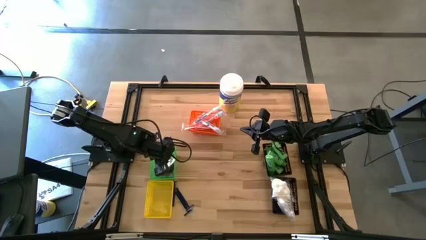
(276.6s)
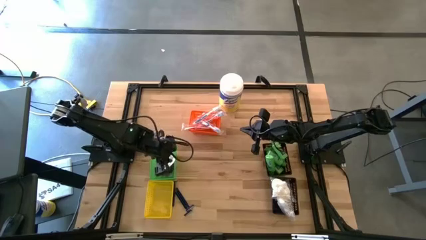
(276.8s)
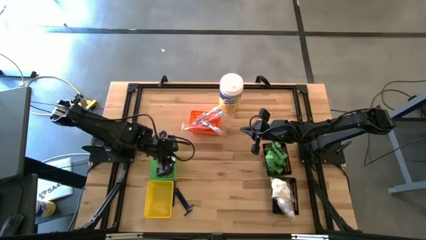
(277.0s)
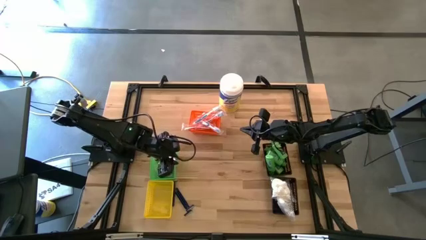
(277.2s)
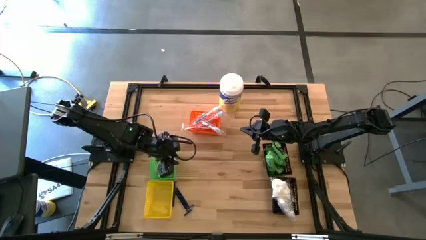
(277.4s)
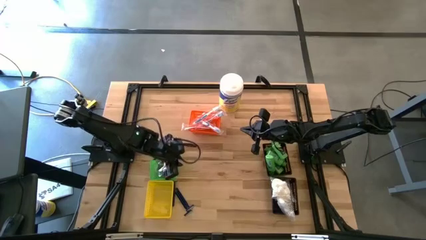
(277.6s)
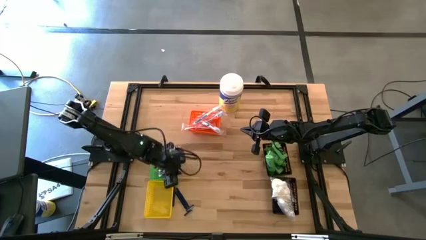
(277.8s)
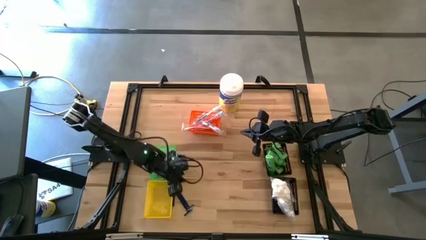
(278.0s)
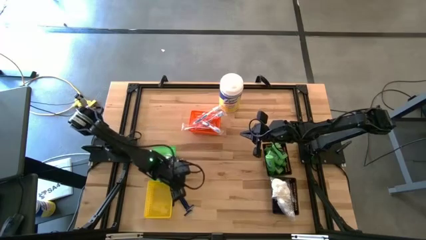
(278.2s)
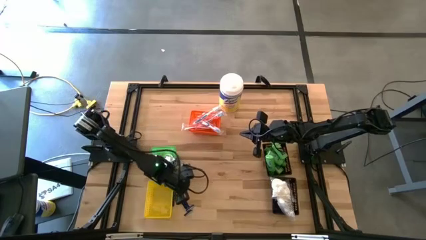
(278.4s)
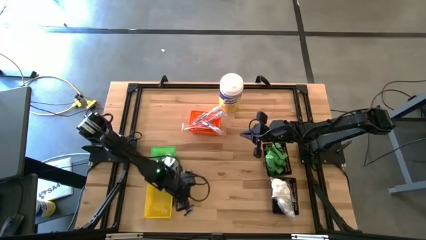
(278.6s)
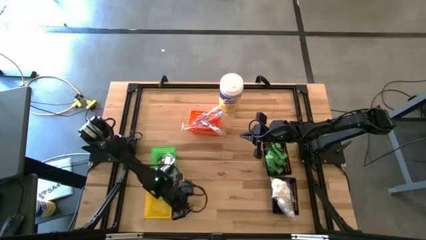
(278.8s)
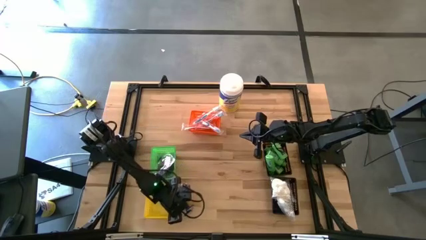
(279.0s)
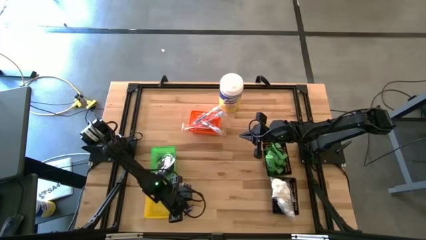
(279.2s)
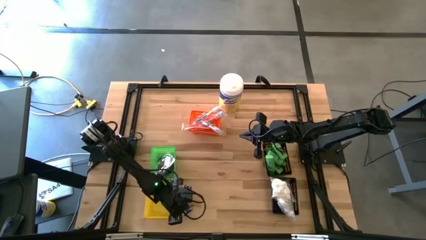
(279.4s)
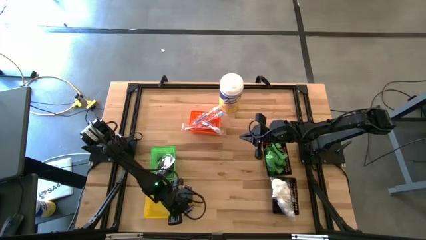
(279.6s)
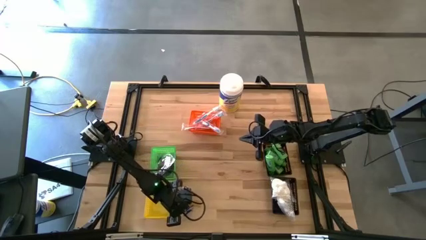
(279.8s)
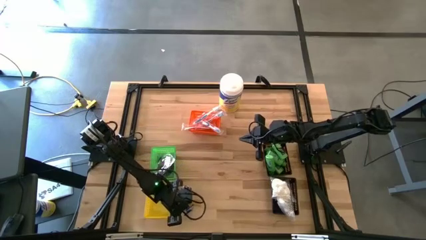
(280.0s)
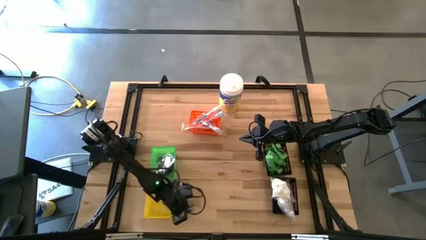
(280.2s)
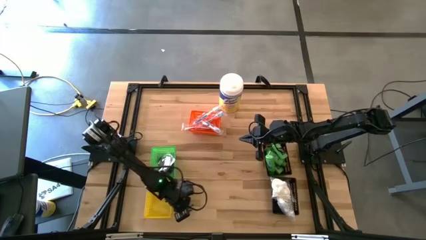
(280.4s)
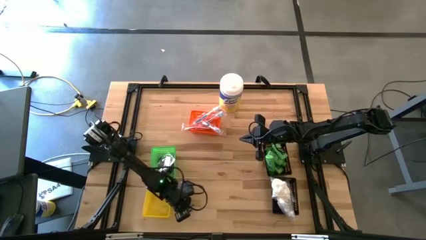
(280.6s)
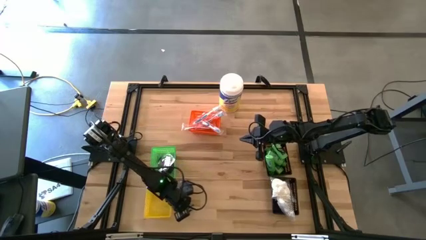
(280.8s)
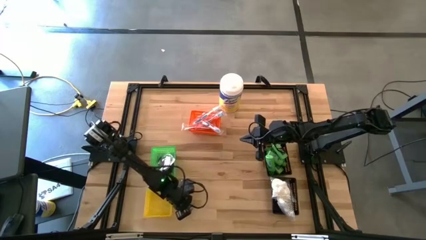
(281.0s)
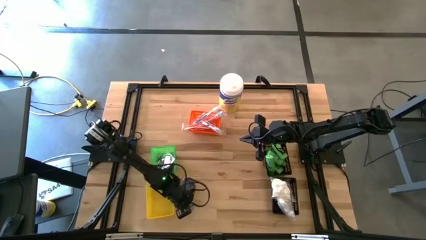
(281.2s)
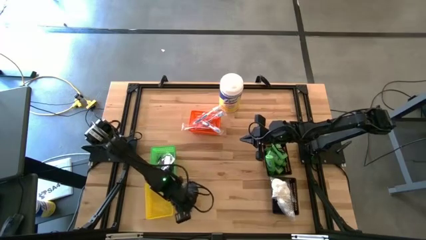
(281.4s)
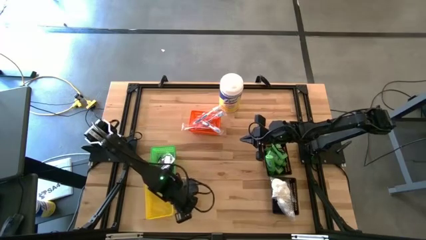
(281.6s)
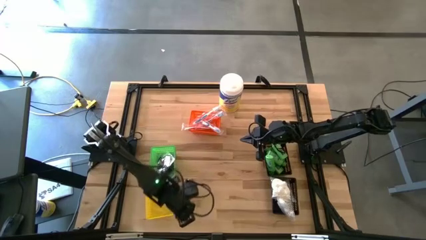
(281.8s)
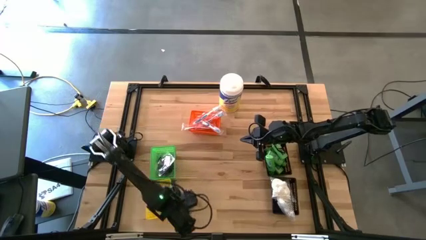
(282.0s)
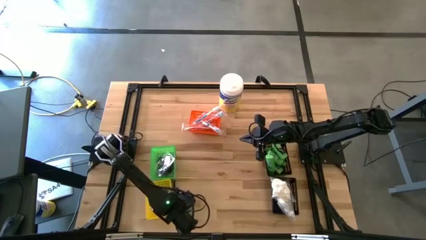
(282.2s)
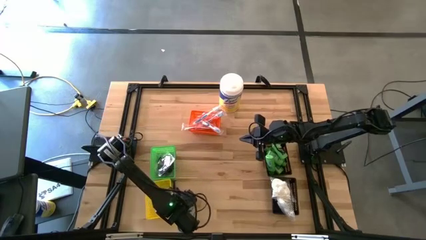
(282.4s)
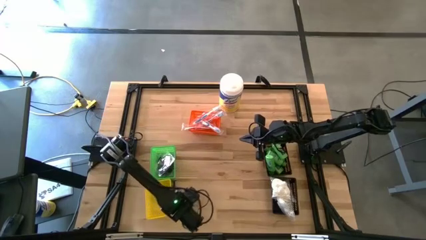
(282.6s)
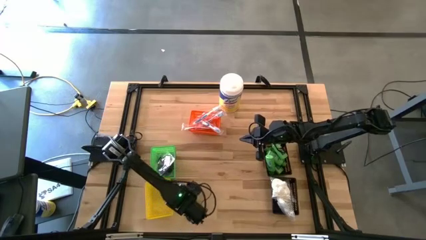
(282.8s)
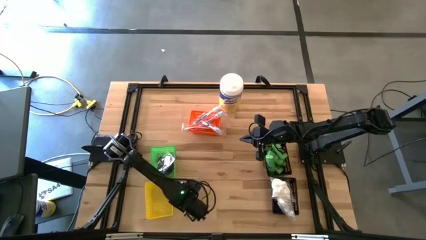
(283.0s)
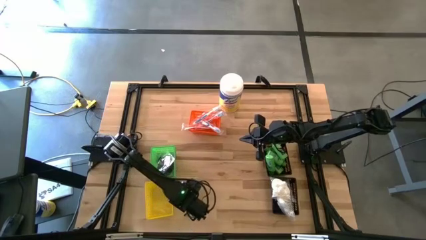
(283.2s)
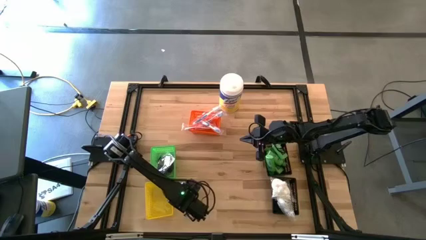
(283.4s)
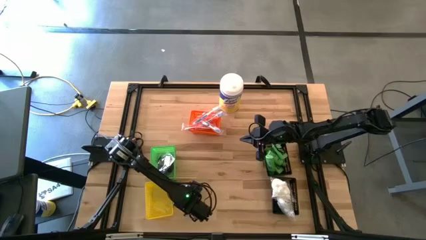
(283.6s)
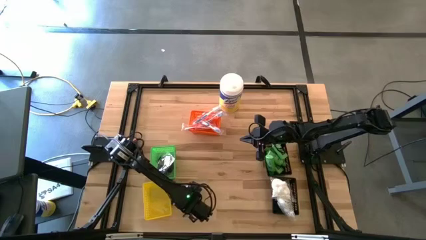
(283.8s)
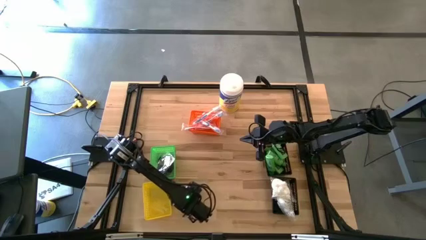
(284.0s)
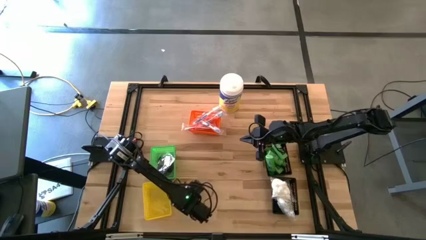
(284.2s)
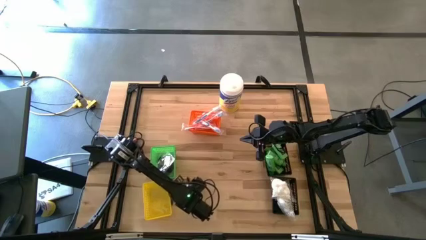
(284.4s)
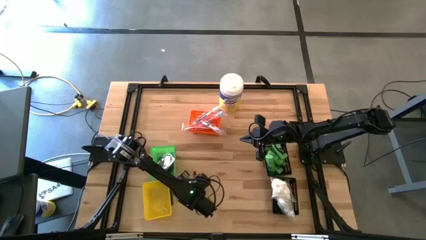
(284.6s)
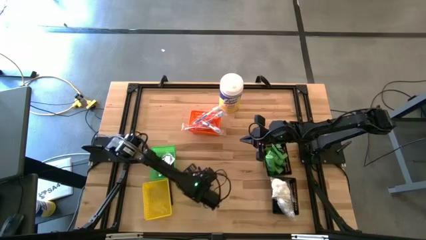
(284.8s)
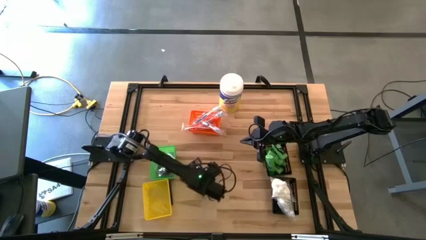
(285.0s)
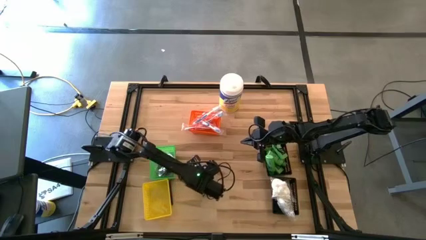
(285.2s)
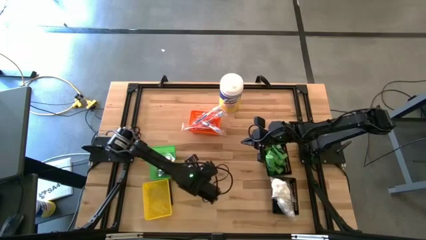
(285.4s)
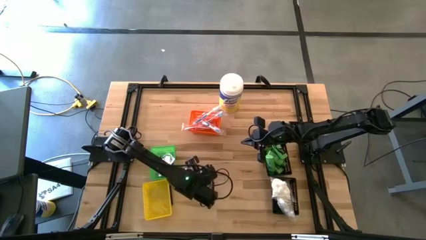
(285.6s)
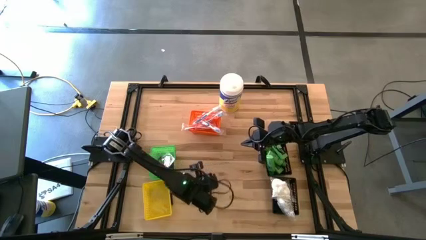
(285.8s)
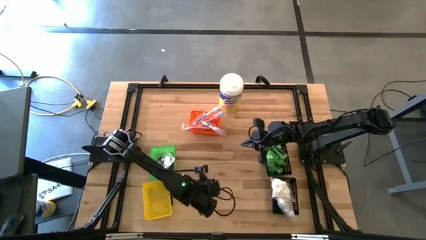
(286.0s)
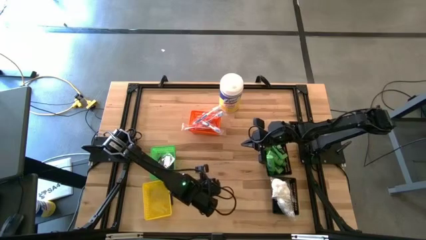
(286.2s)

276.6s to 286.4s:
Task: Pick & Place Travel size toiletries
Put the blue razor into the yellow bin

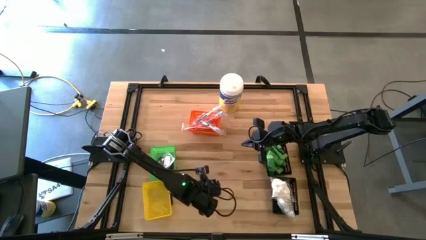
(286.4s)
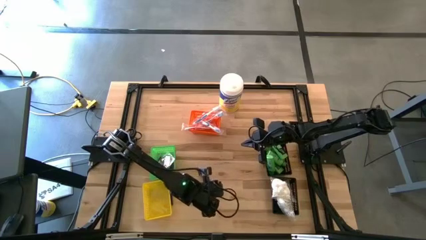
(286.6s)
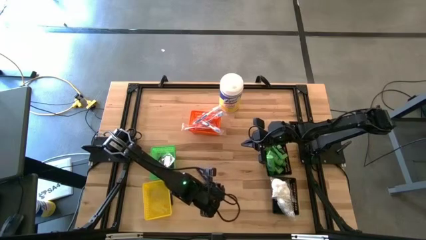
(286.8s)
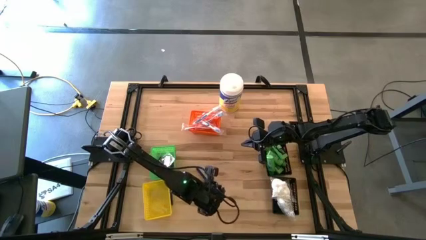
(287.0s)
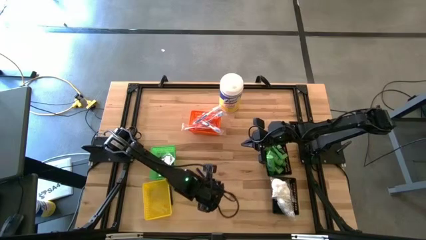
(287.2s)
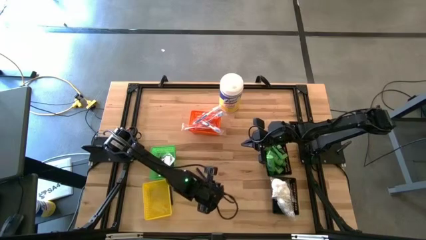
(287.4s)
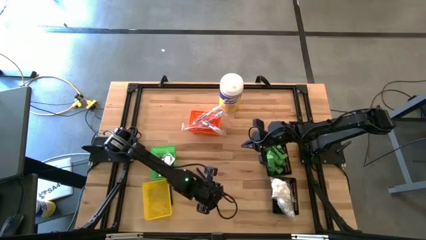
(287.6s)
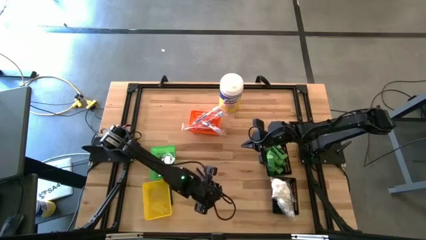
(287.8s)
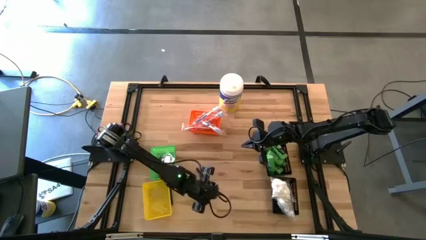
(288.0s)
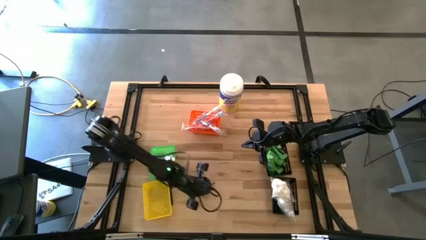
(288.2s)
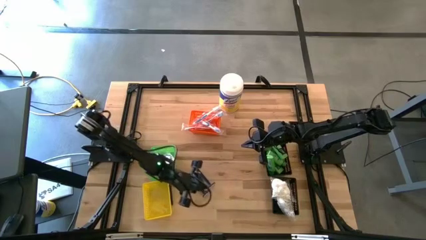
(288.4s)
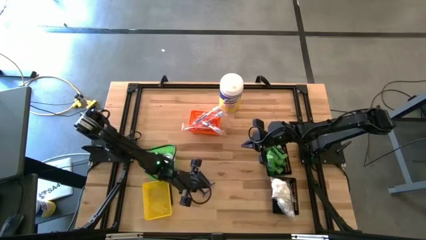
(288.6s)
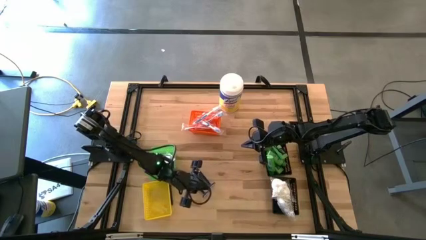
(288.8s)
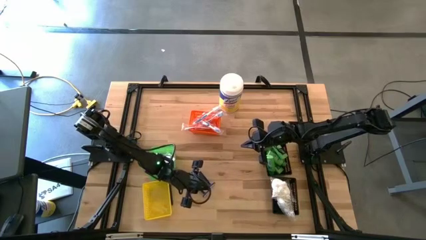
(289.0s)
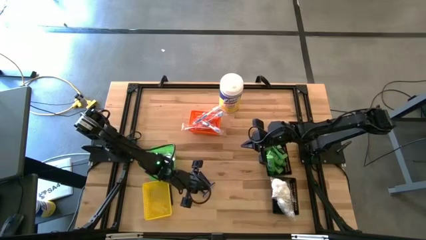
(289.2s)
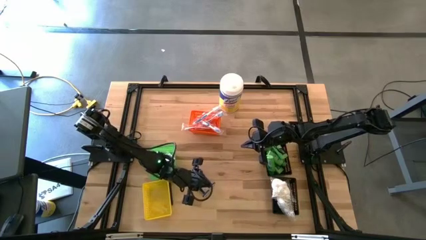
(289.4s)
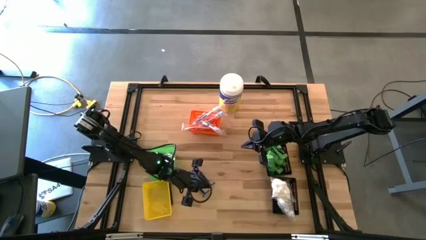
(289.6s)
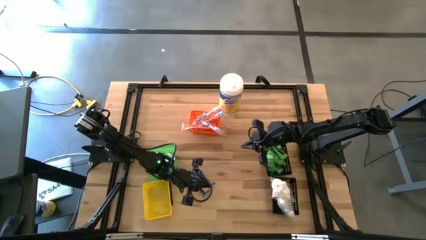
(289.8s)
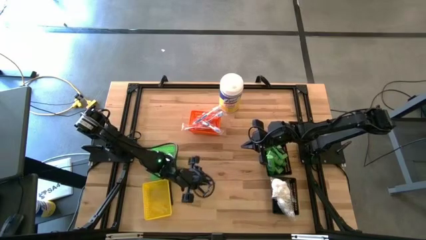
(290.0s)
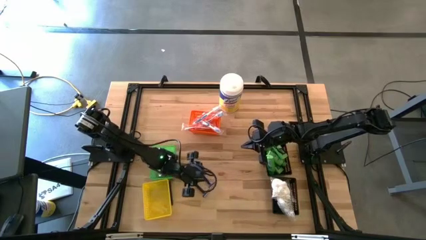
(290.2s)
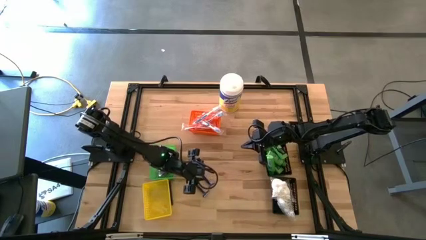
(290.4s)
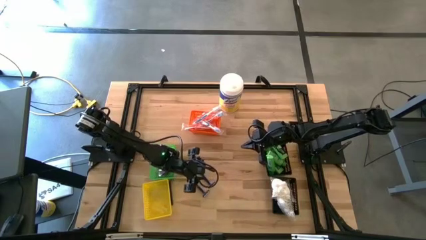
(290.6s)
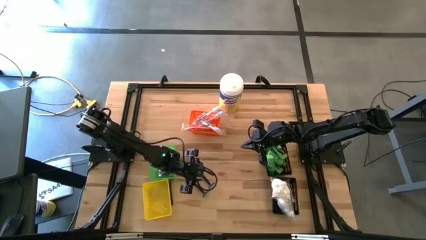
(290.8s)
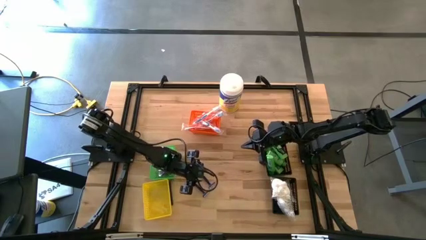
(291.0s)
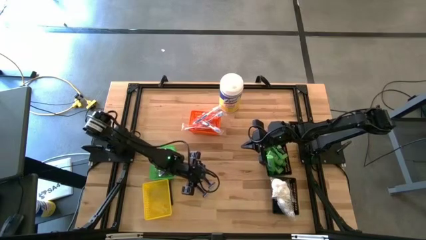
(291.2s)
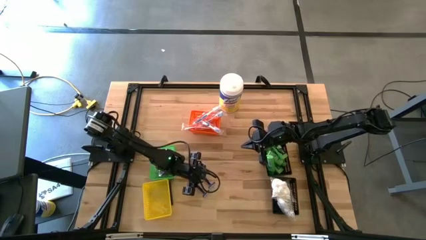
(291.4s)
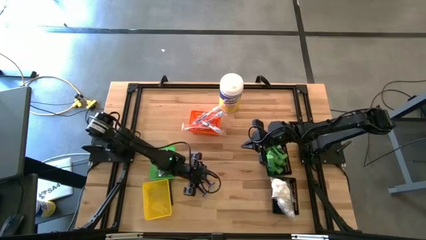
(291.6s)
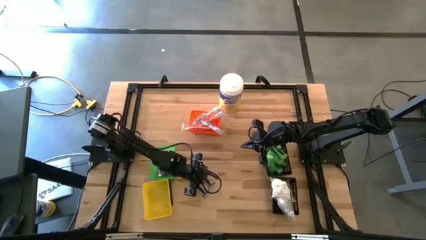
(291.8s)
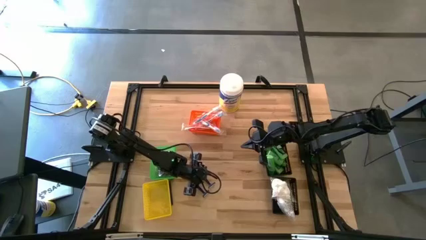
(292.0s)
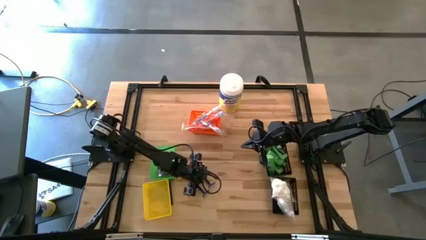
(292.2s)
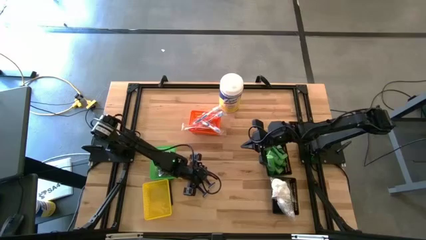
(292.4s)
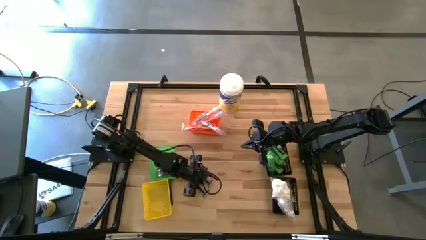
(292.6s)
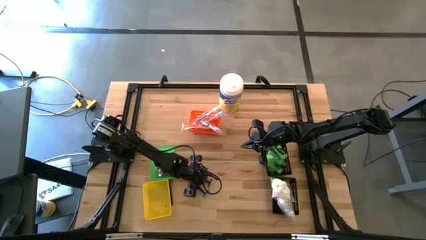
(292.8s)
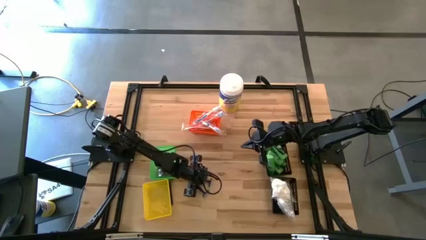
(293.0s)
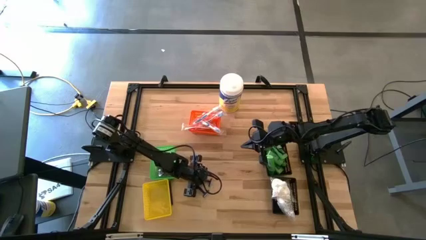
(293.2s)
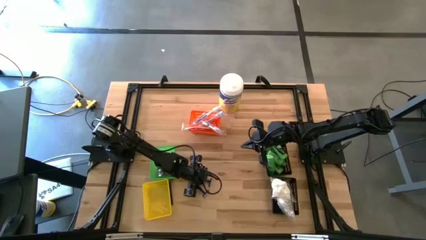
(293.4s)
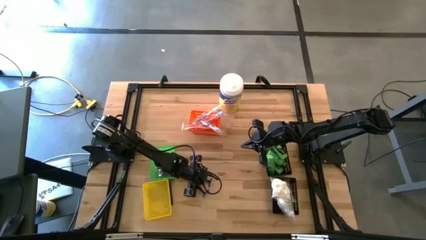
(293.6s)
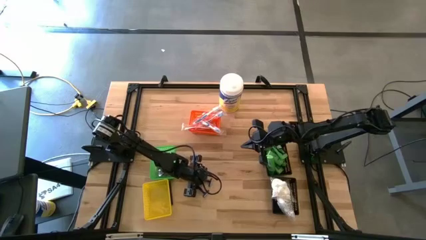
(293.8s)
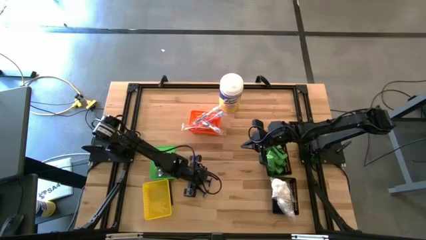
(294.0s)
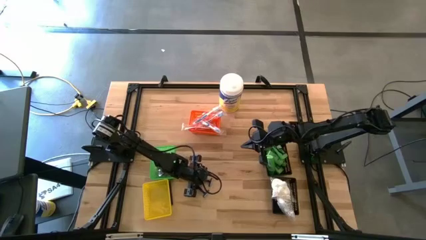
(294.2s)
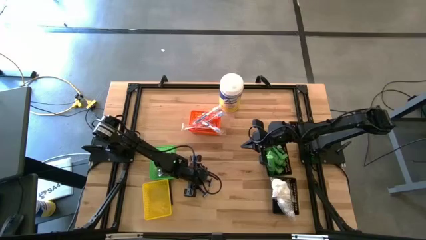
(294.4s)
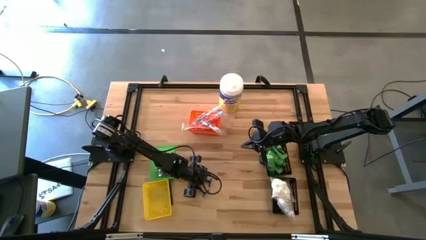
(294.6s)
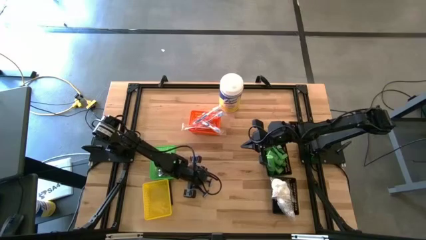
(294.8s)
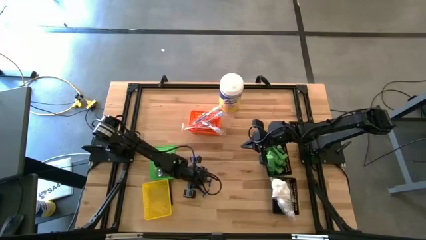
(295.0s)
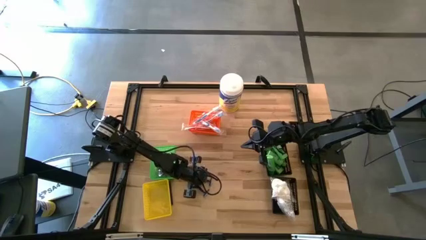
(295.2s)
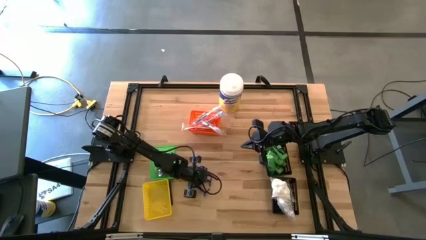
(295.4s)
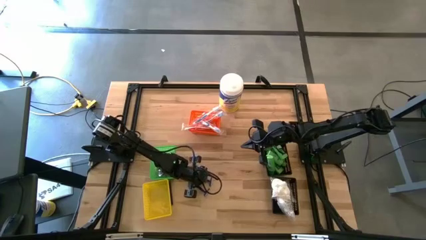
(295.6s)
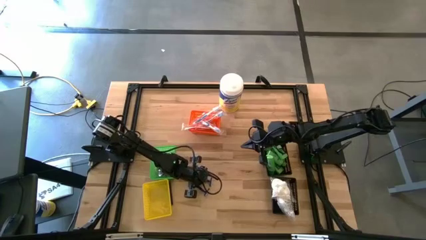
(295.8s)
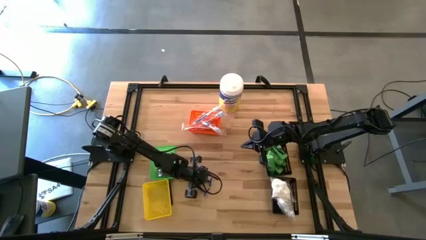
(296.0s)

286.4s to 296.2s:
Put the blue razor into the yellow bin
